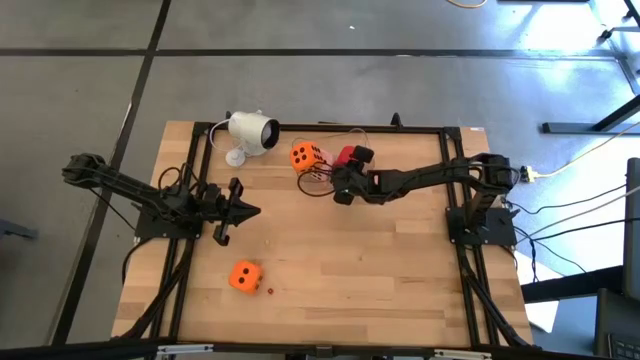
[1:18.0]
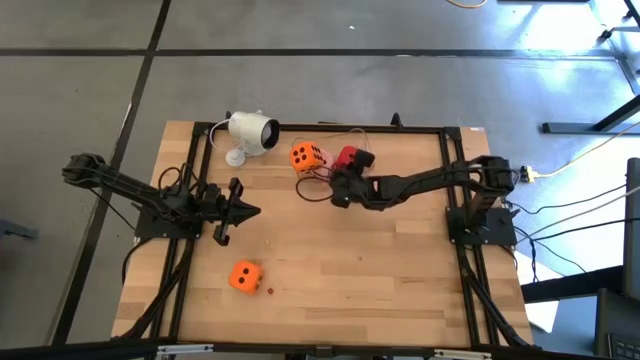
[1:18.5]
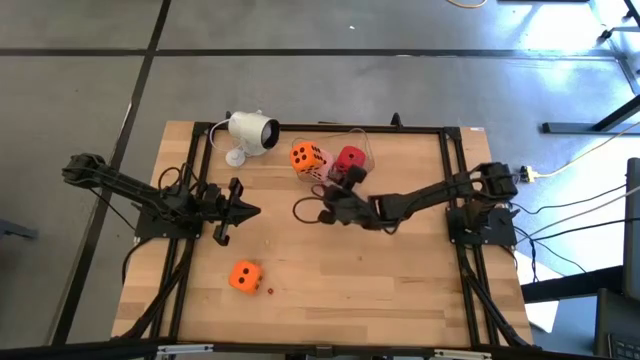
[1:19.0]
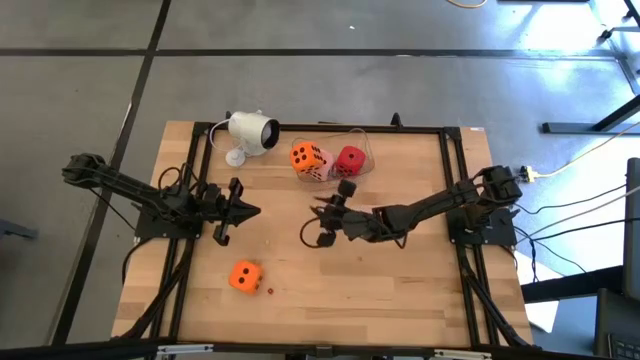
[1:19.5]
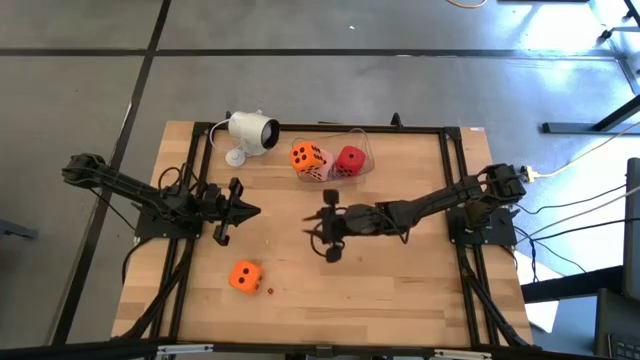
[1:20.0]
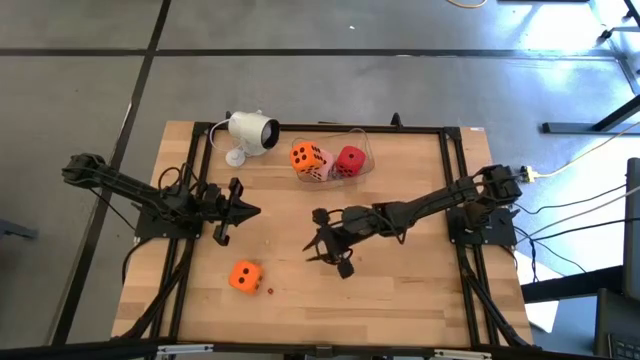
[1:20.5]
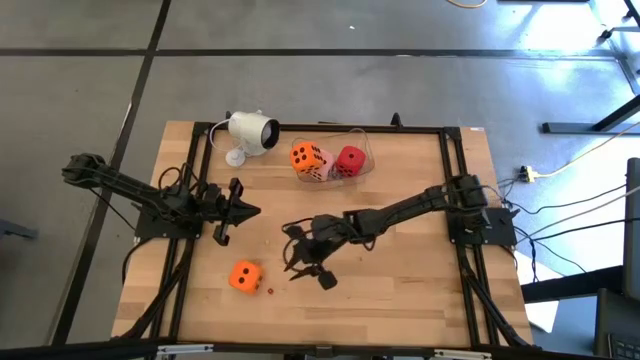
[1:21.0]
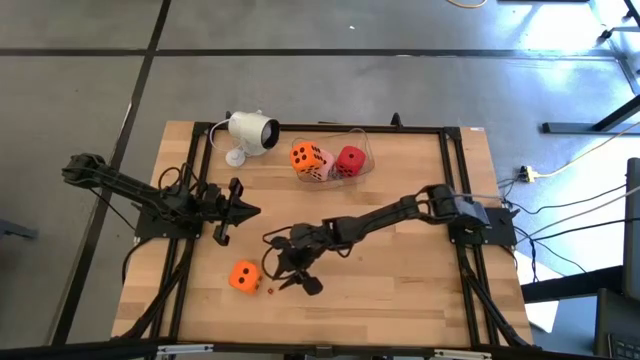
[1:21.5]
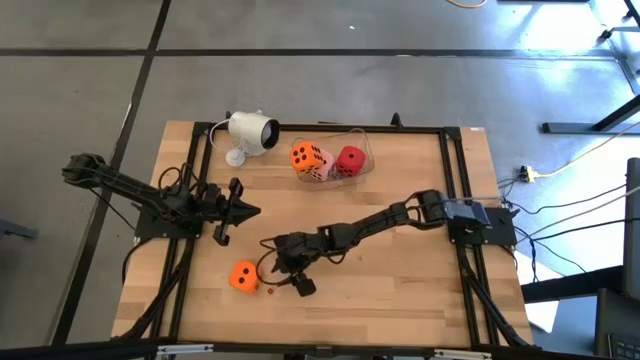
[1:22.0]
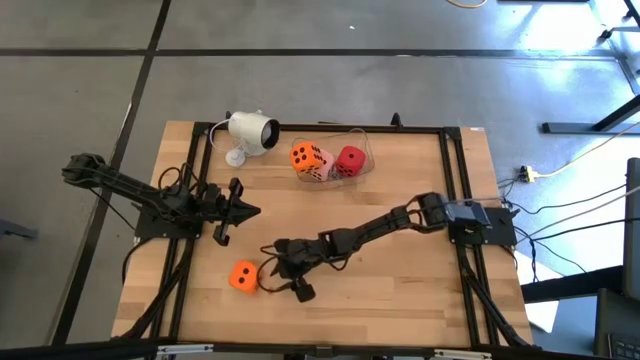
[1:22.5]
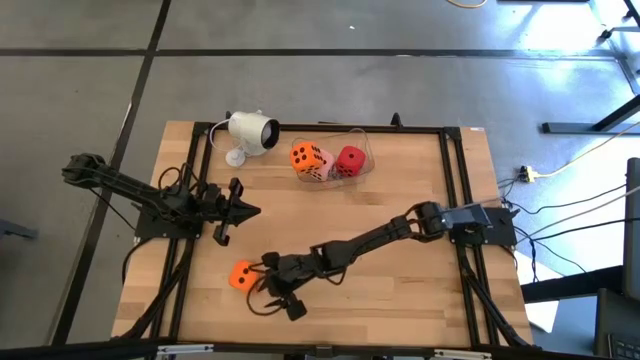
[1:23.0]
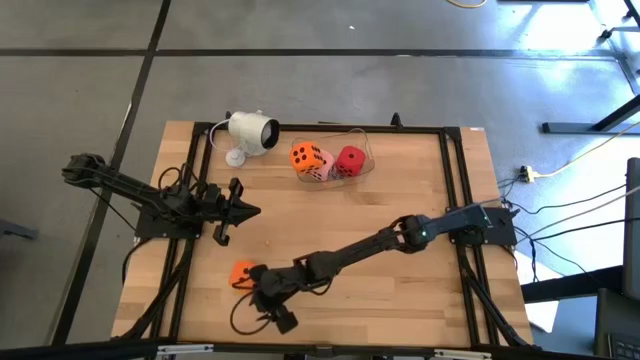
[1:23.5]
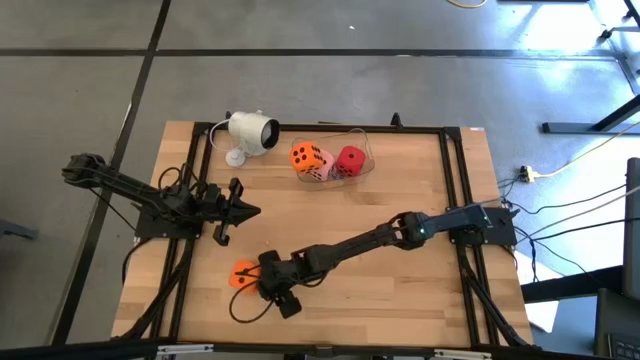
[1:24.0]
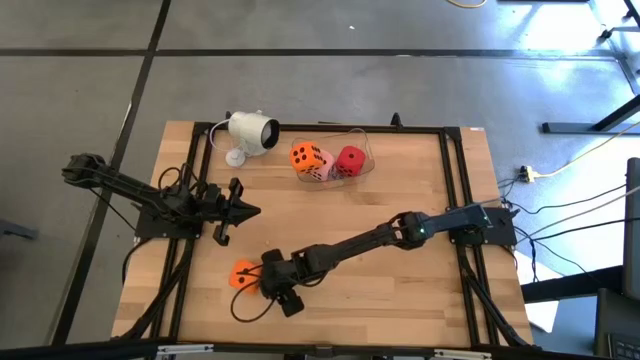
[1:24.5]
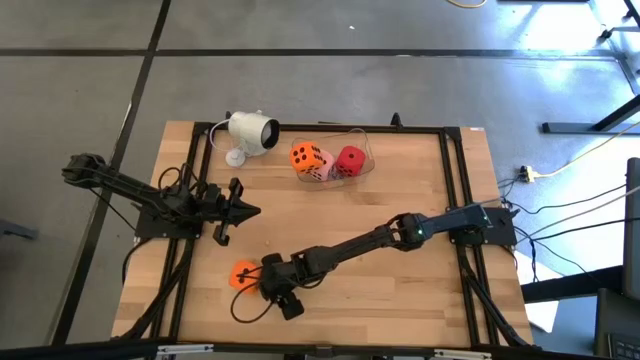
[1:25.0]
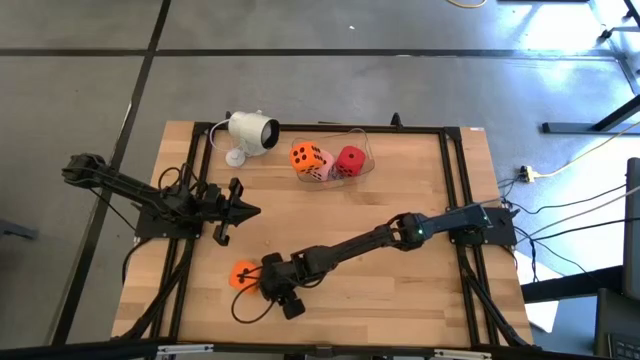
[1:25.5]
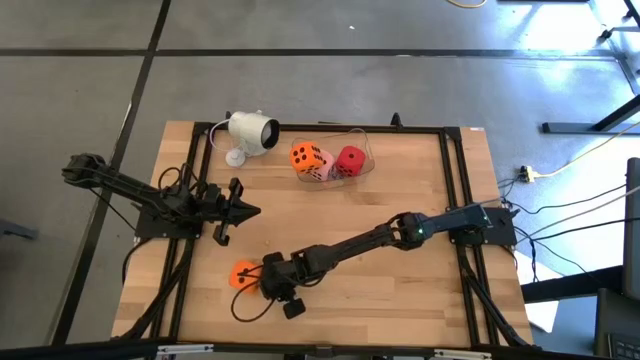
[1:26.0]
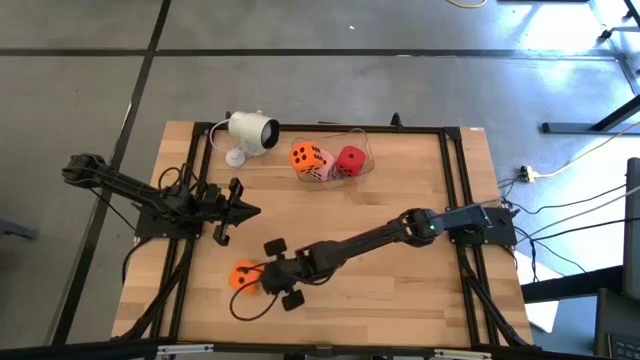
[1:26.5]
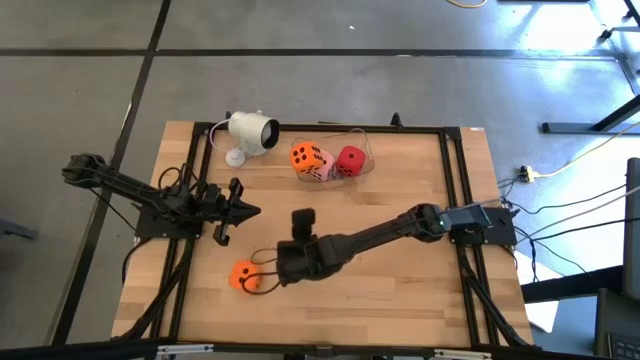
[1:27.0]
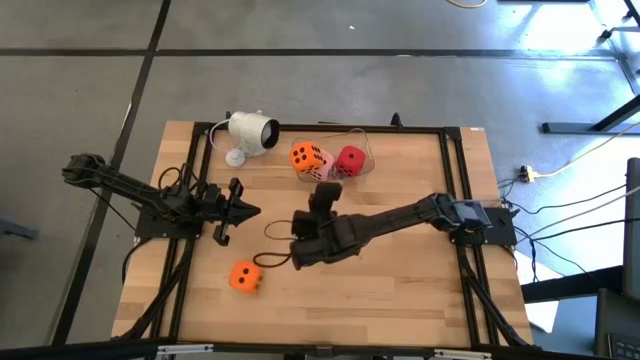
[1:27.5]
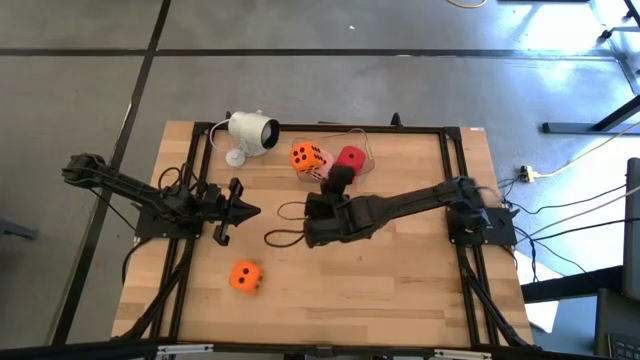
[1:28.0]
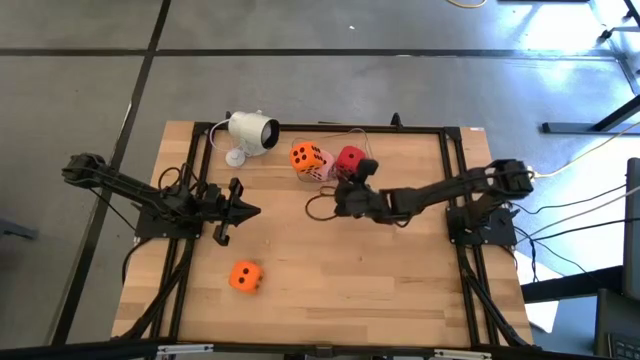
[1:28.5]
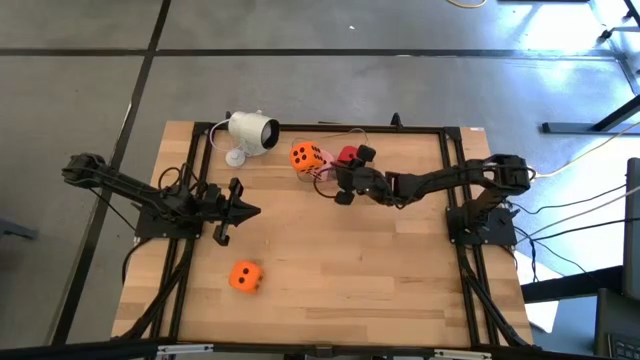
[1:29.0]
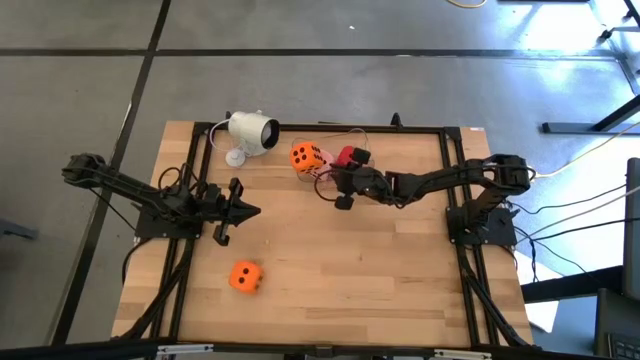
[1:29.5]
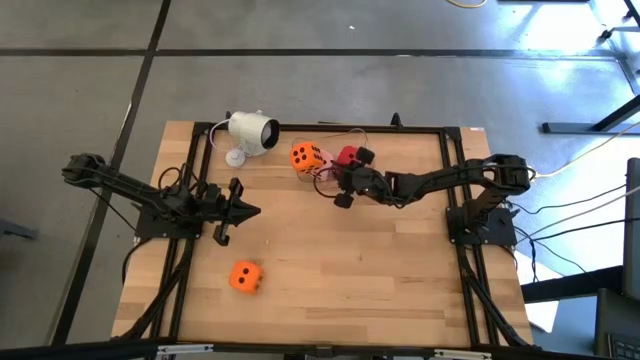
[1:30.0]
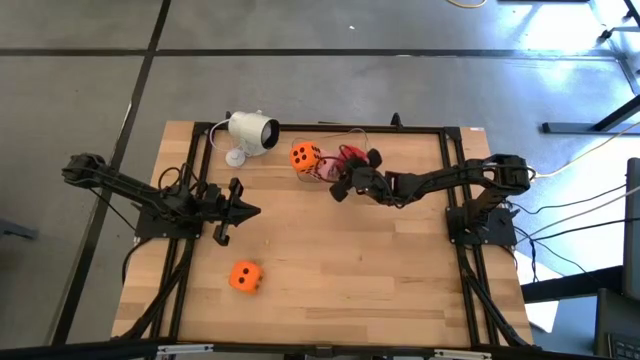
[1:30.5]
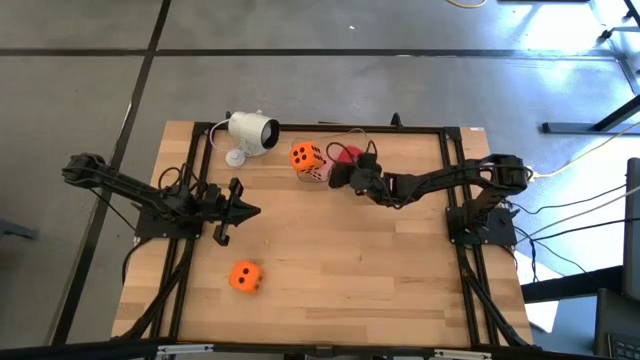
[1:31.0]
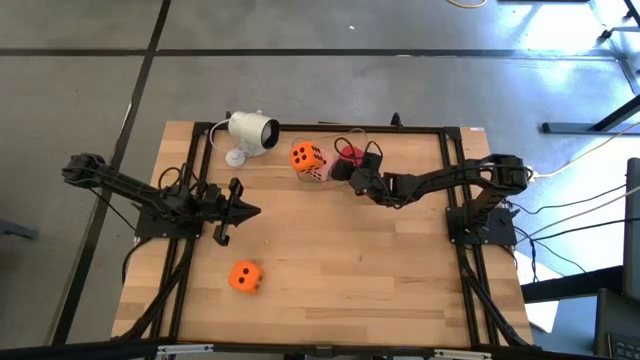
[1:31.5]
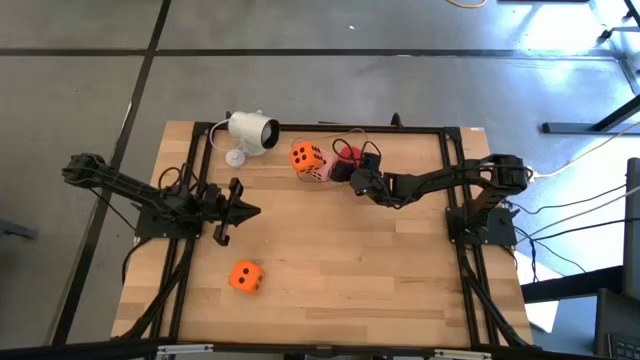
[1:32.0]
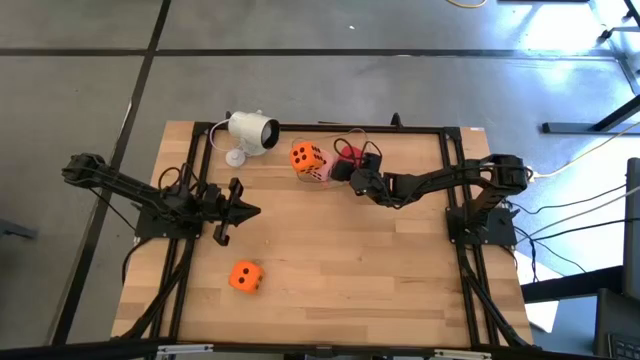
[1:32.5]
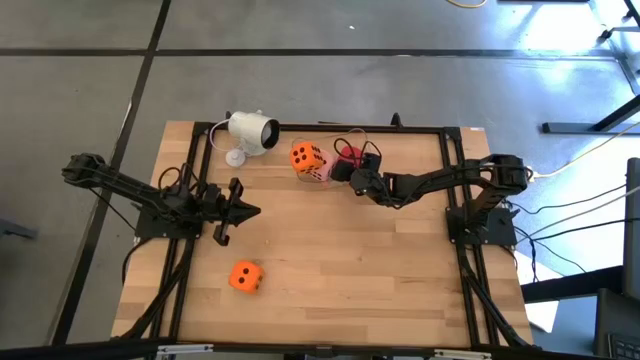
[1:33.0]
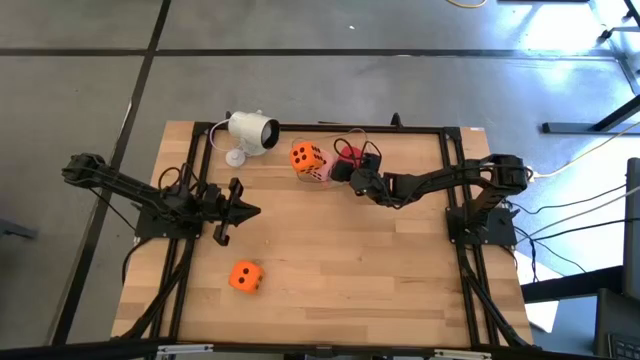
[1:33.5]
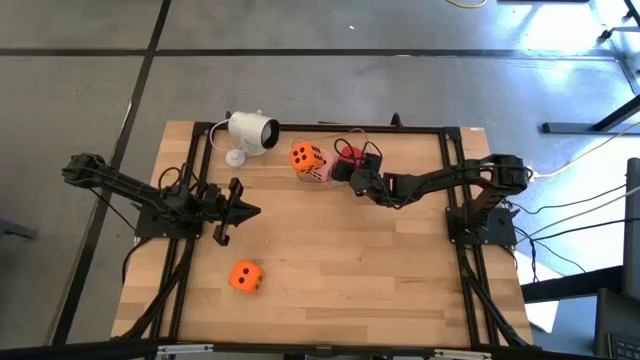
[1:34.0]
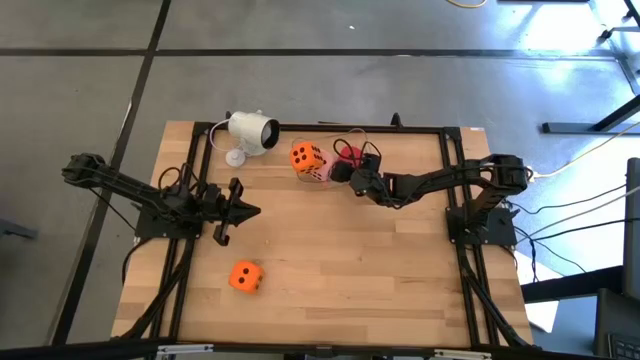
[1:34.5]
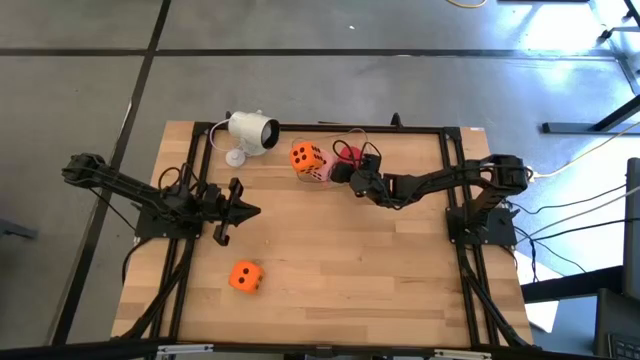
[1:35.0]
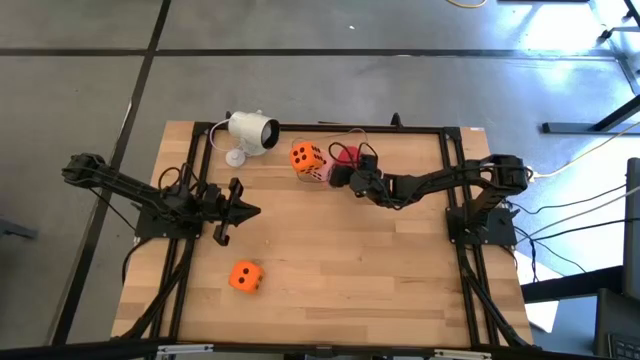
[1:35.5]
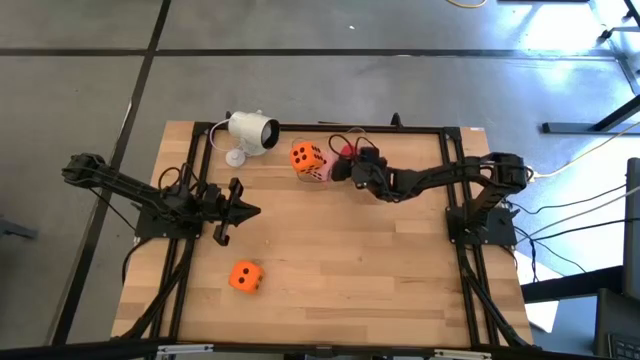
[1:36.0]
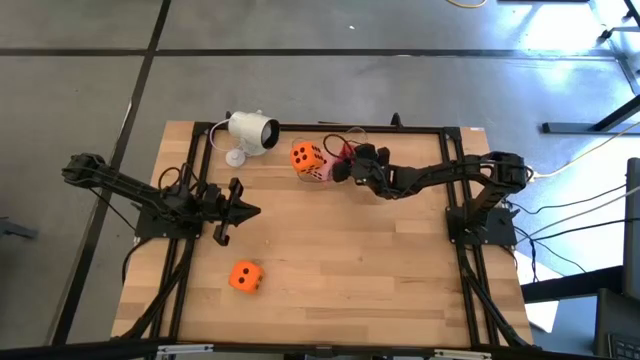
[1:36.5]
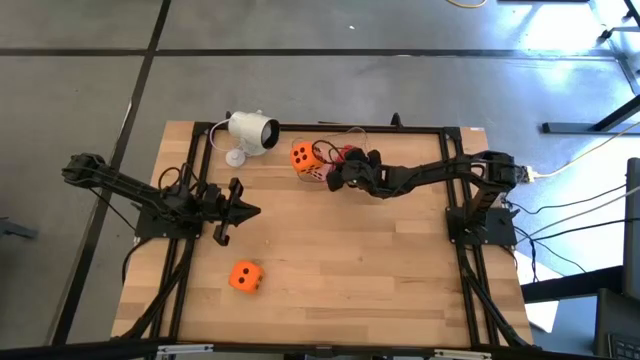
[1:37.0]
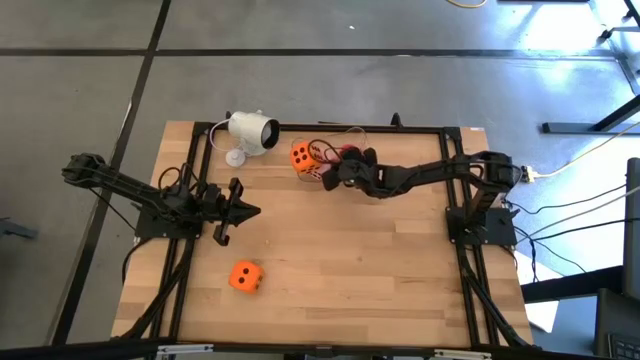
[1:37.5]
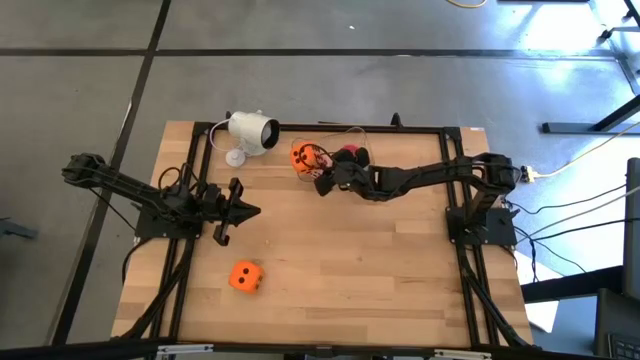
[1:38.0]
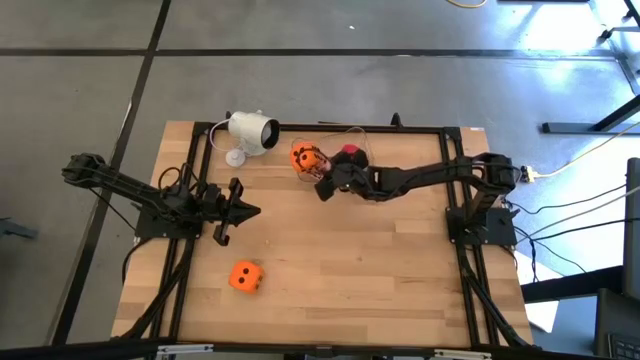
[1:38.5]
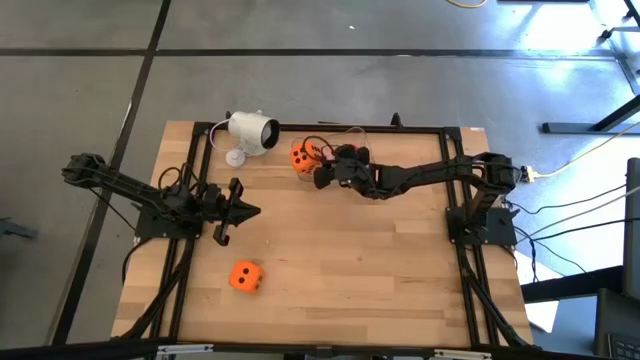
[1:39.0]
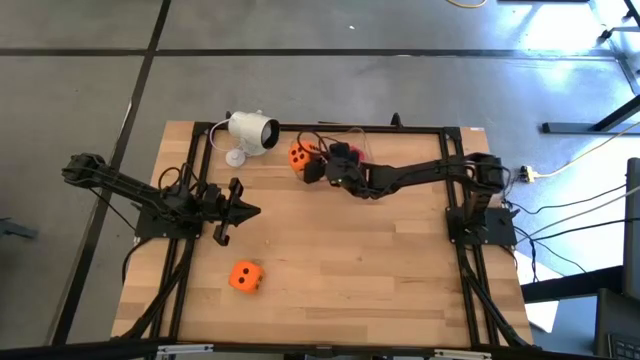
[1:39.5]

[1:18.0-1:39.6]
Task: Pick & Place Dice
Put the small red die into the transparent bin
